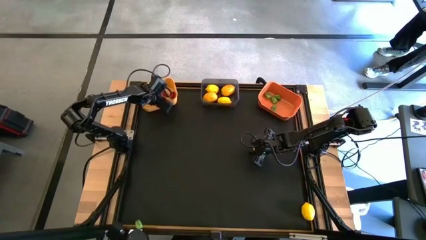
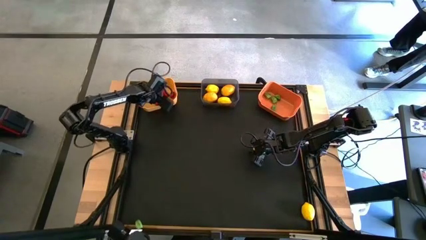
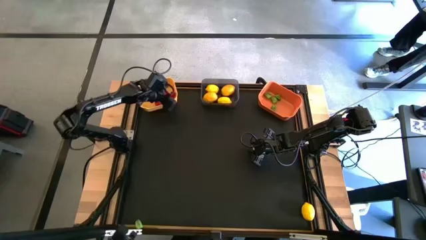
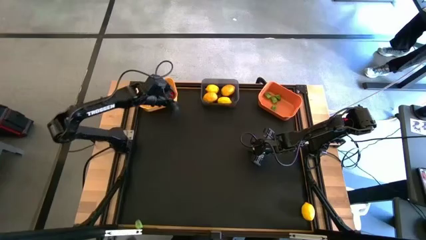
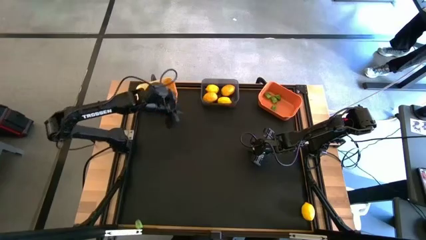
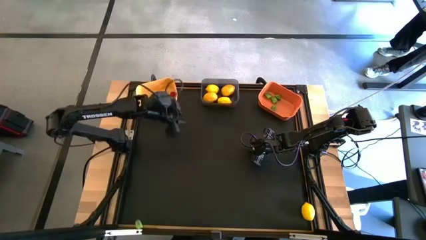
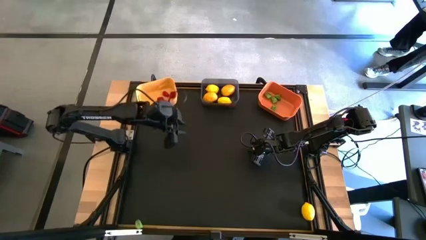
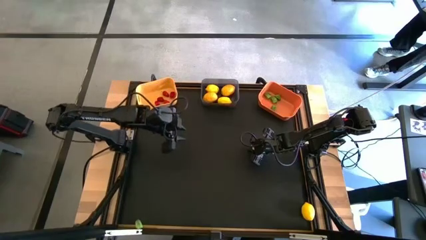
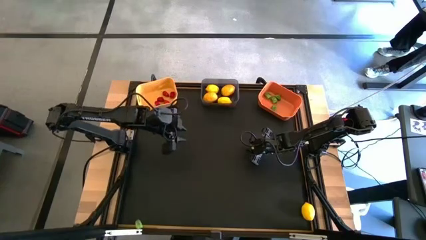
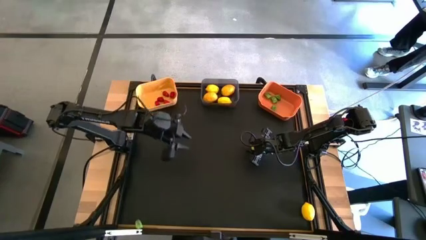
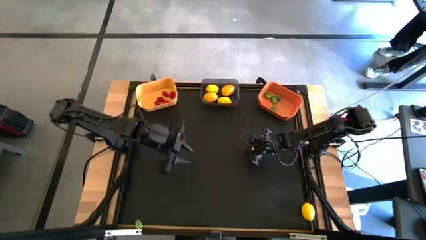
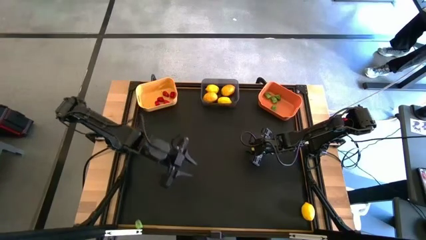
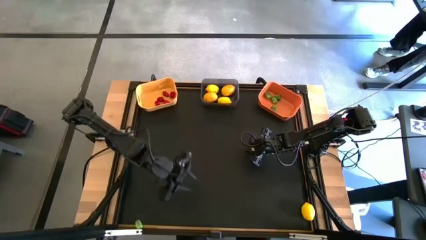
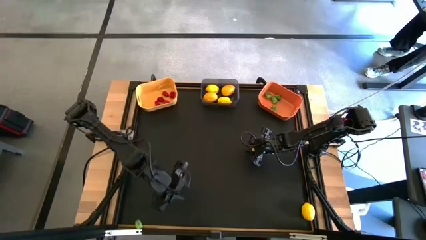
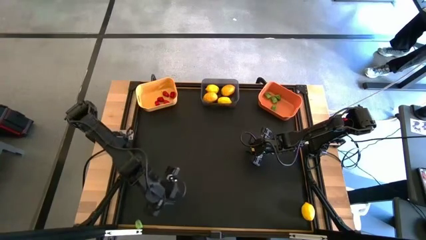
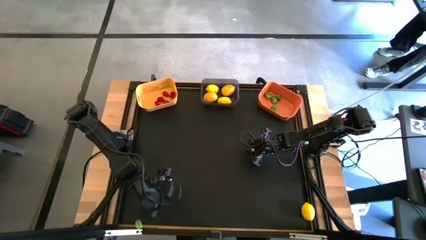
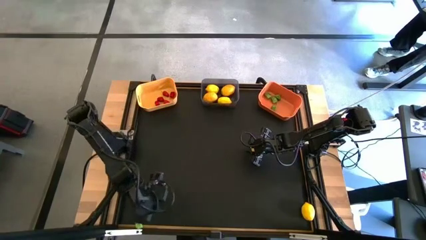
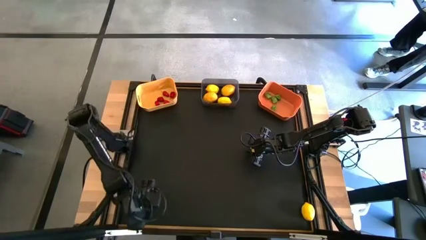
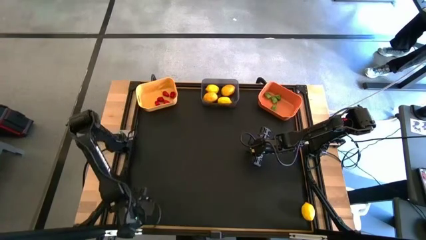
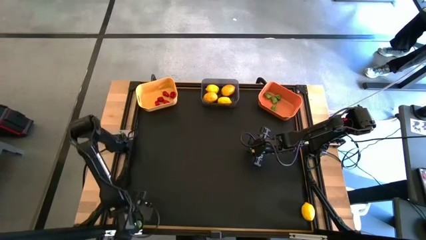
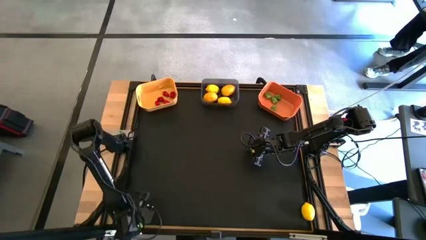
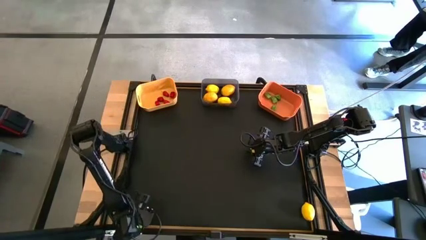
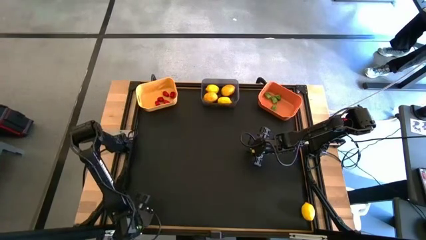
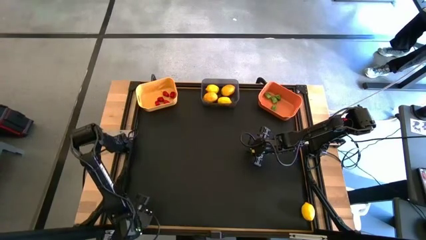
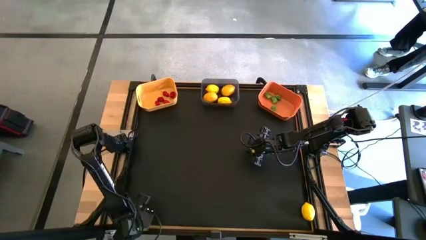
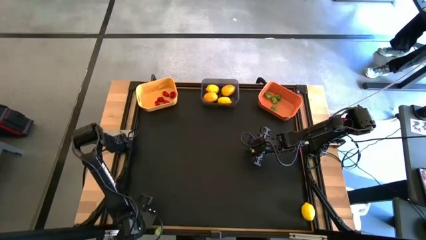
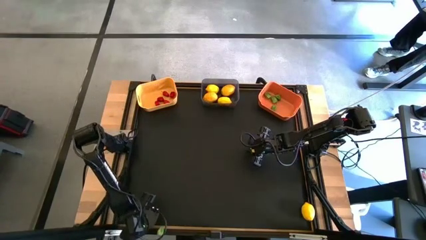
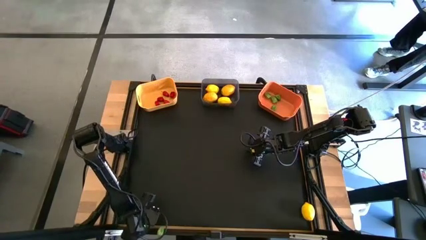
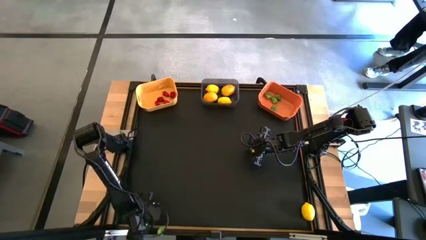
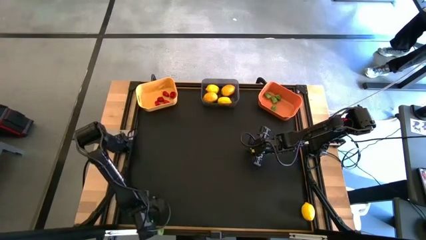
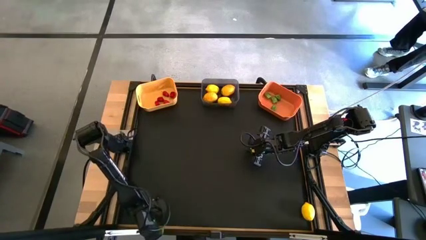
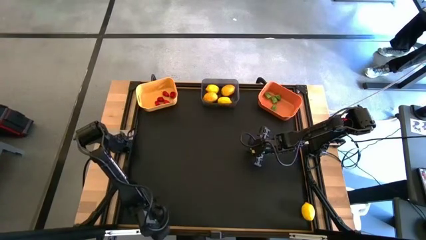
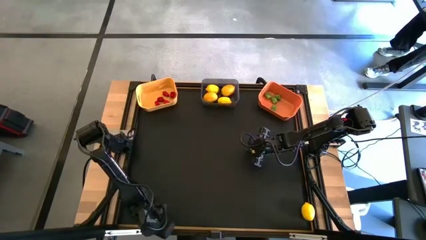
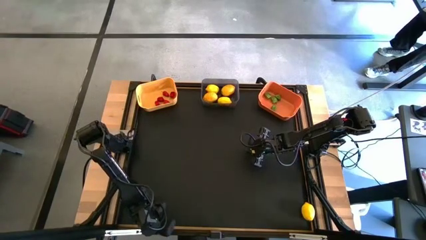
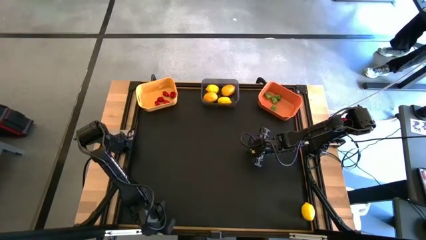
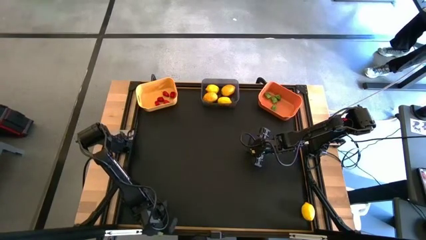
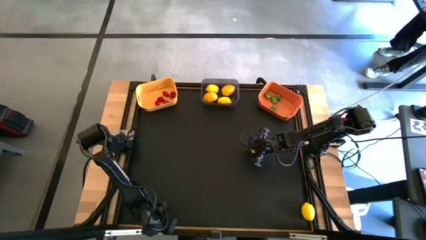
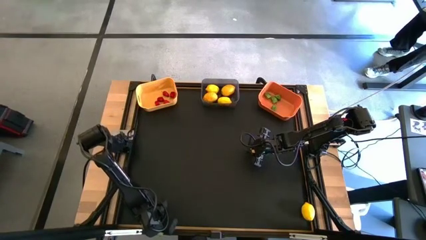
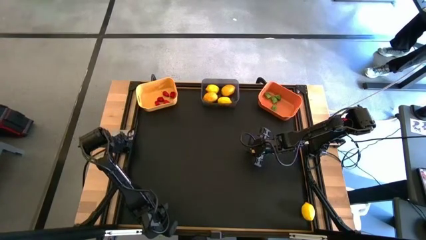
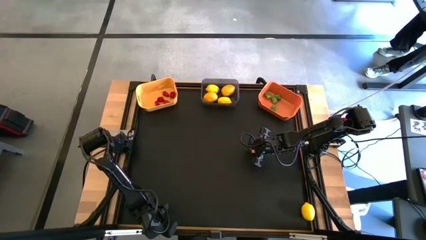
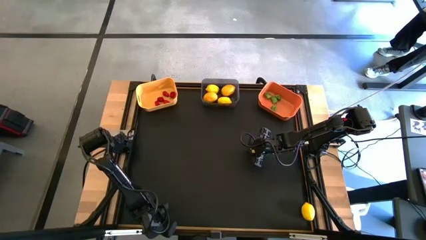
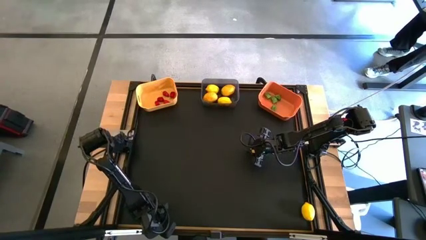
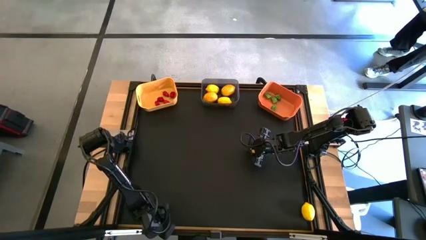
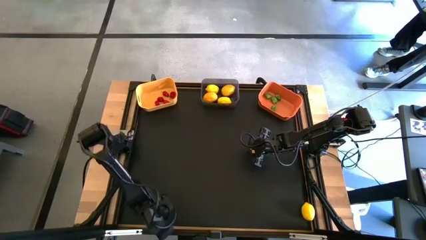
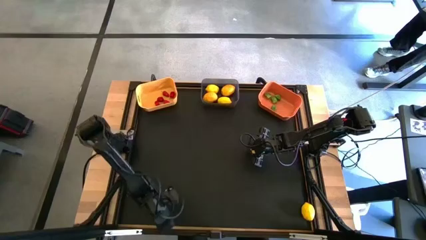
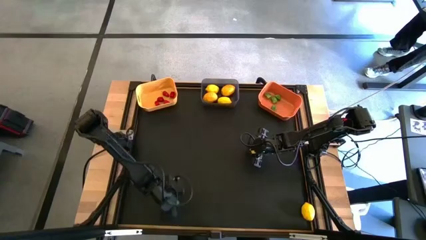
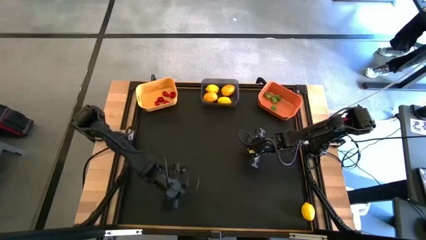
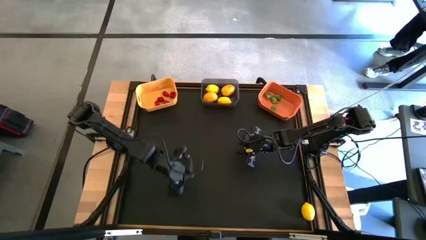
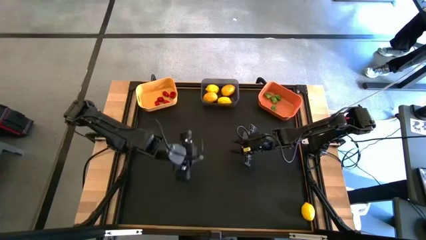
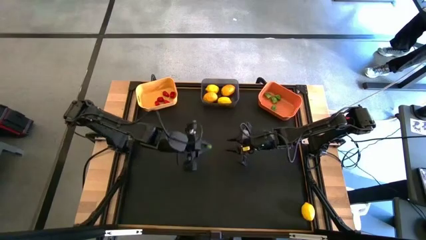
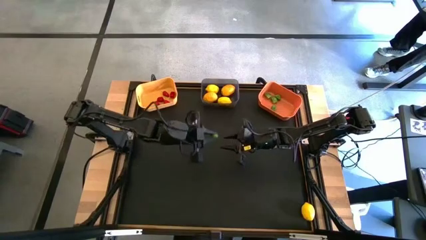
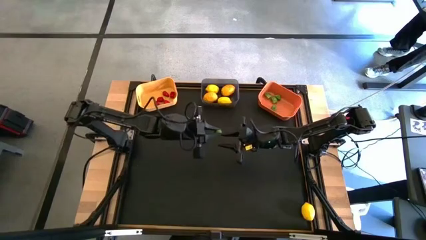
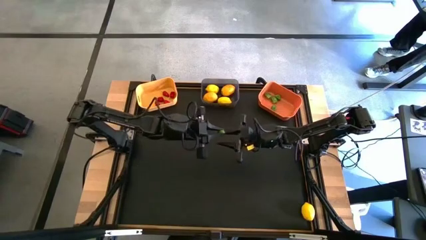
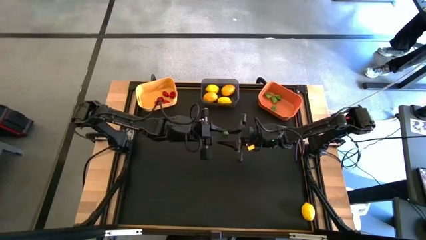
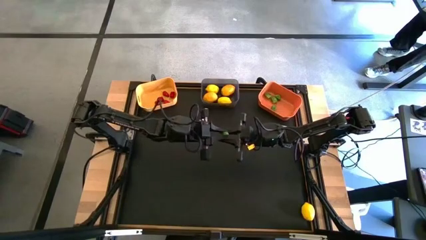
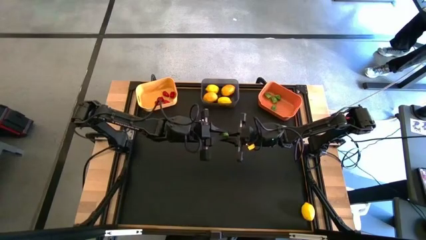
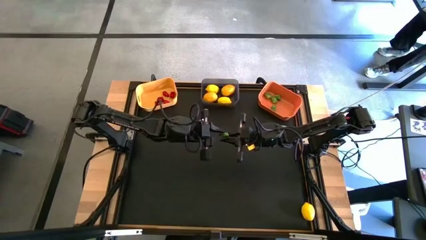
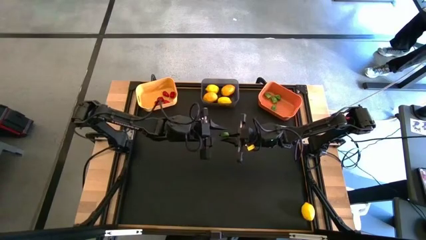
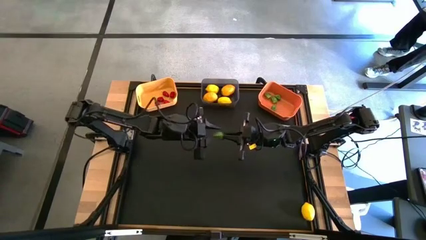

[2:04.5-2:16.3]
Task: Sort produce into baskets
Put the green chili pepper into the orange bin

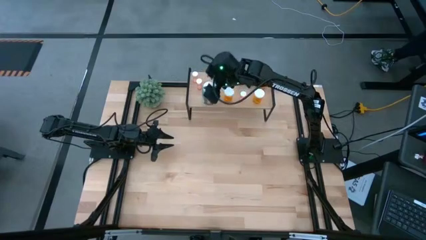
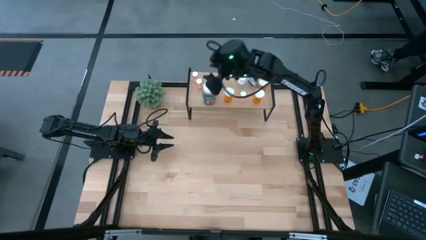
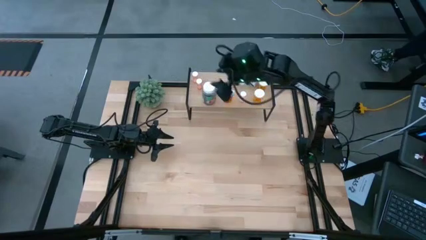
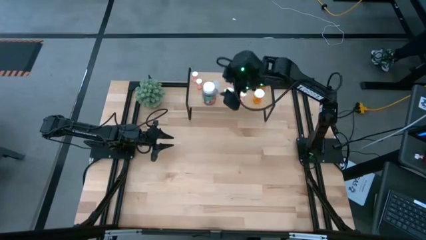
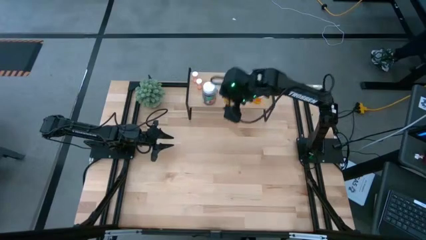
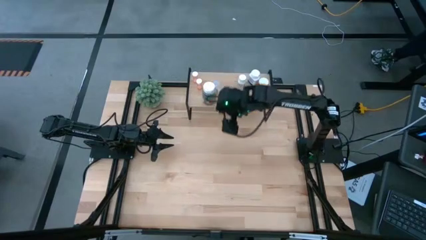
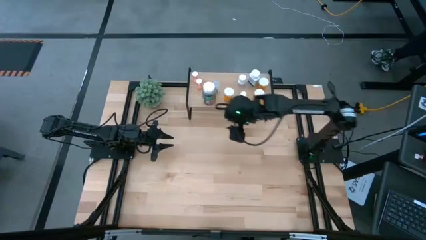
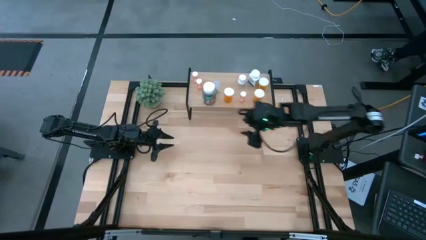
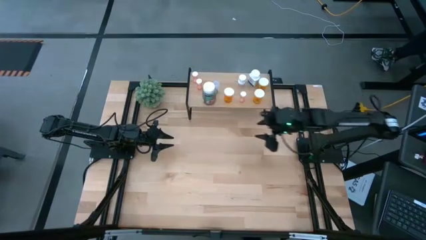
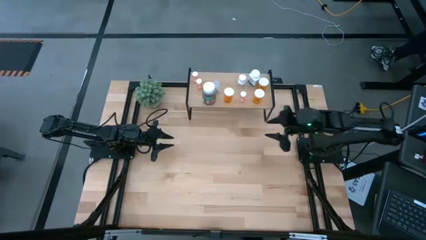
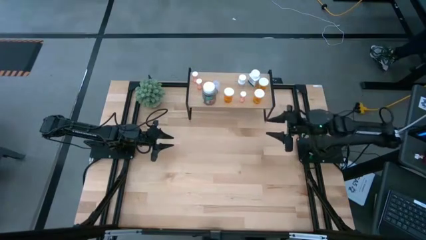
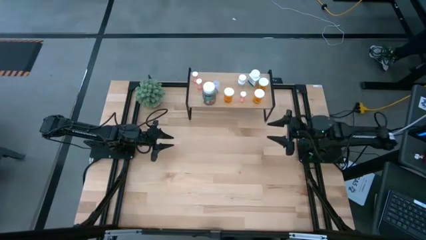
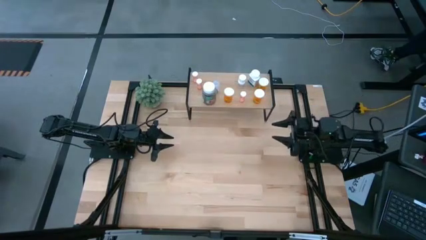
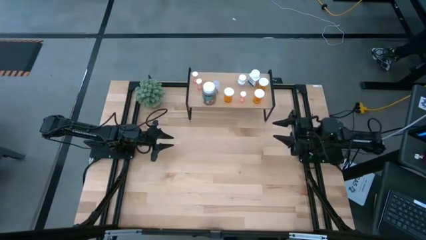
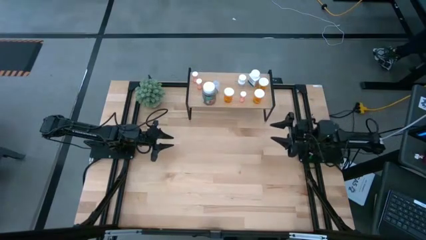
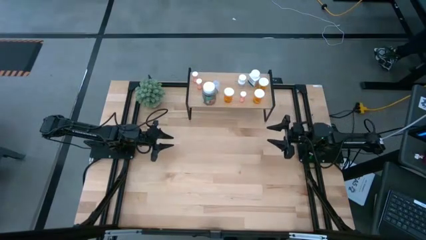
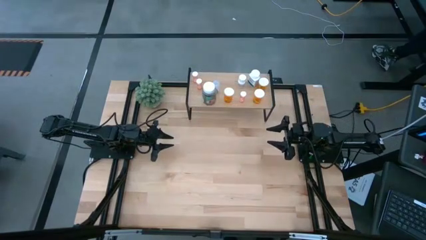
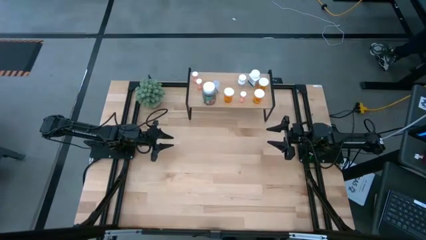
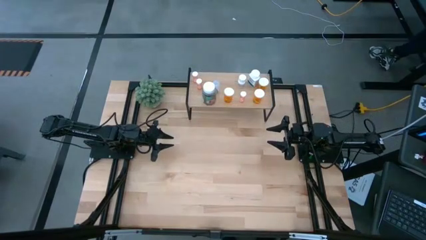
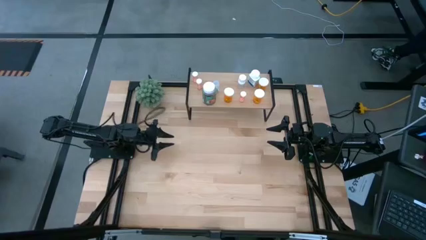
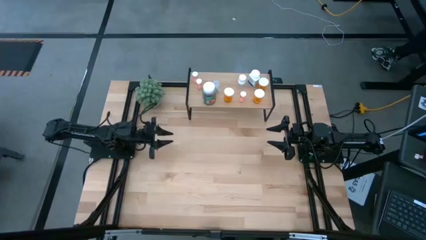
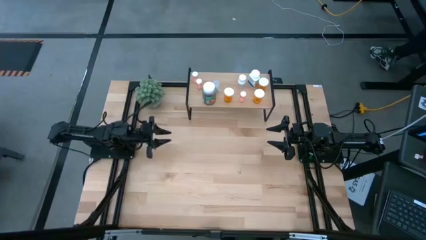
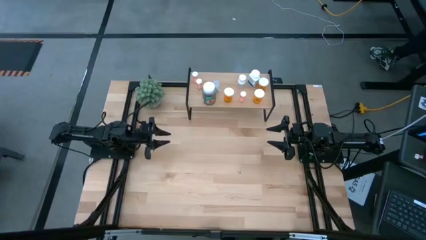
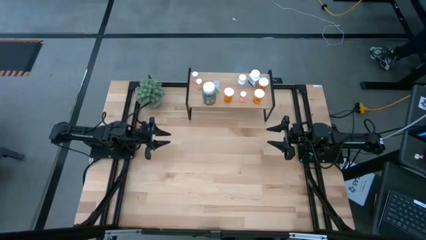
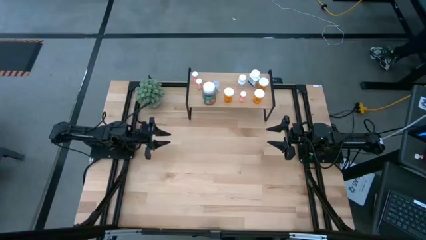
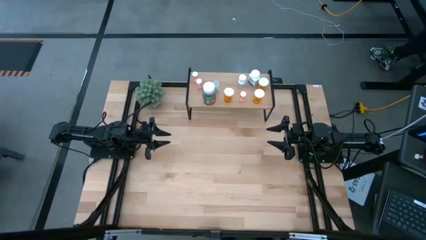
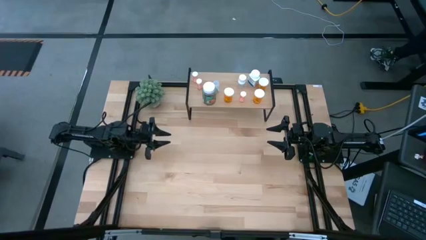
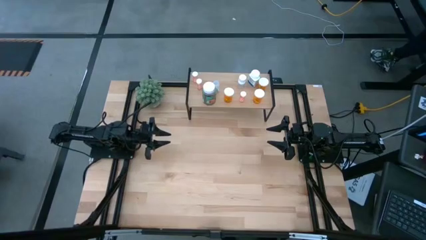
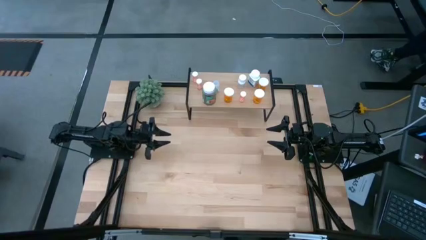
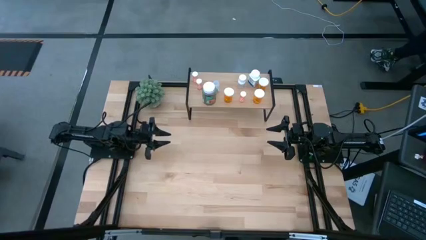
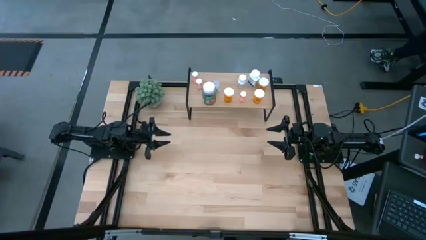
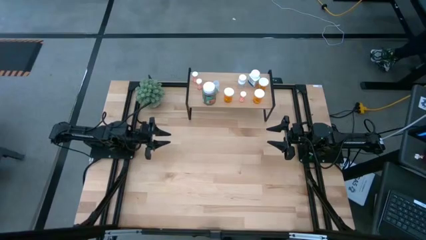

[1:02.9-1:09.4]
Task: Pick and place medicine bottles onto shelf by color
Return to Home Position
